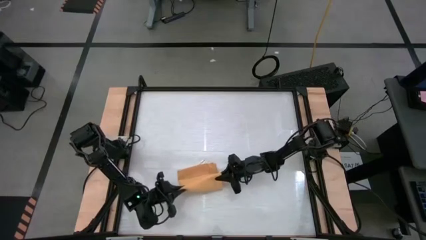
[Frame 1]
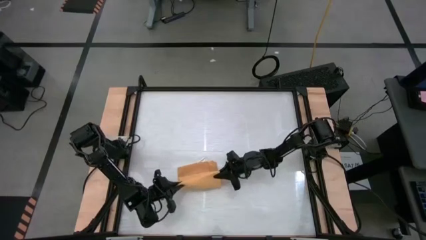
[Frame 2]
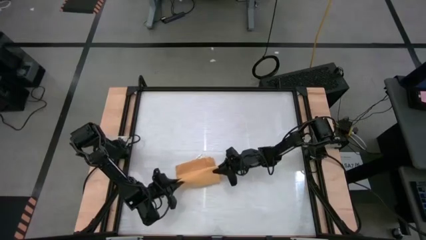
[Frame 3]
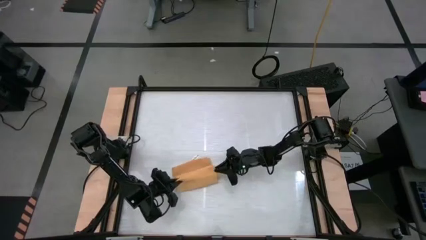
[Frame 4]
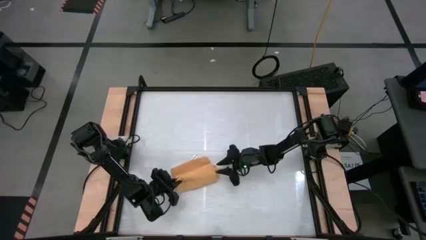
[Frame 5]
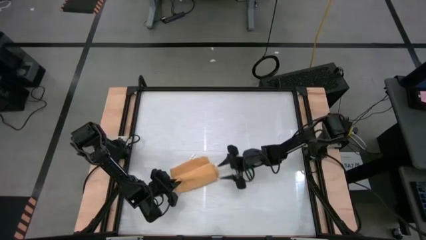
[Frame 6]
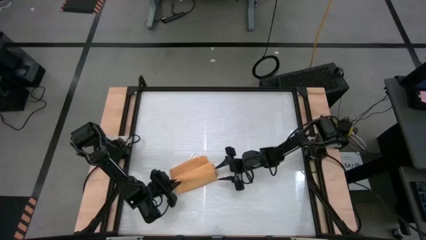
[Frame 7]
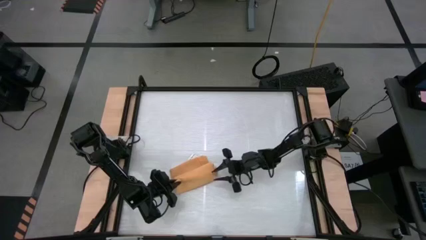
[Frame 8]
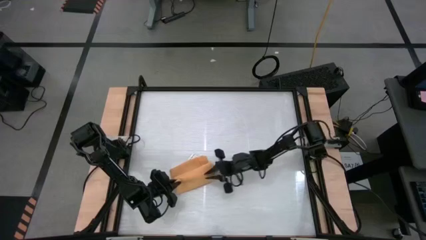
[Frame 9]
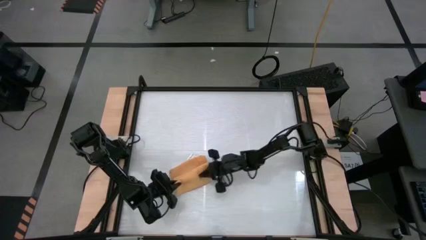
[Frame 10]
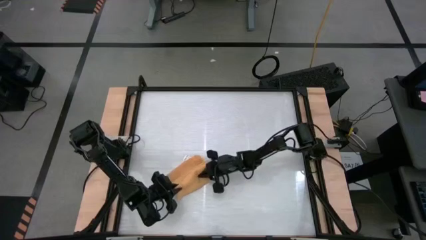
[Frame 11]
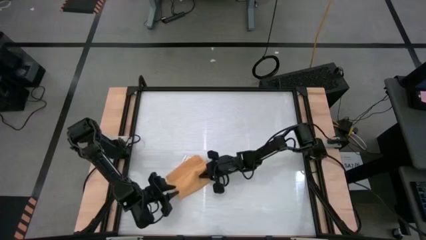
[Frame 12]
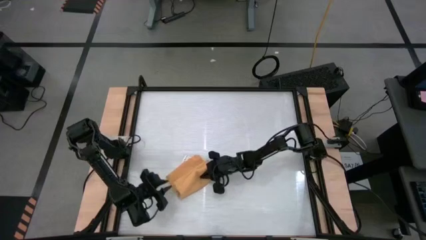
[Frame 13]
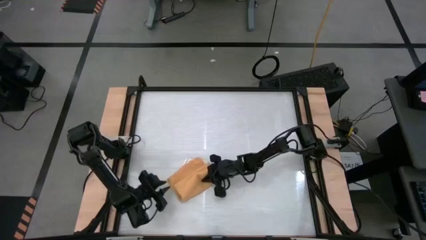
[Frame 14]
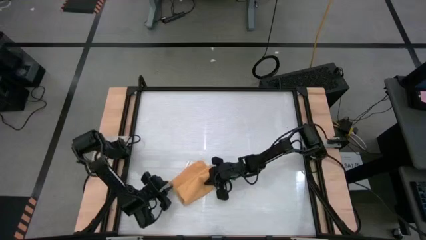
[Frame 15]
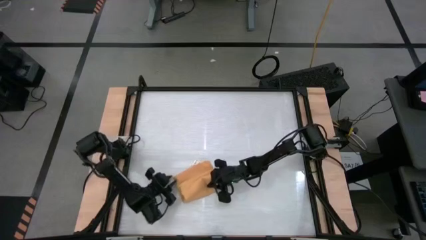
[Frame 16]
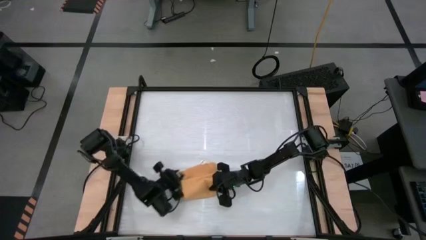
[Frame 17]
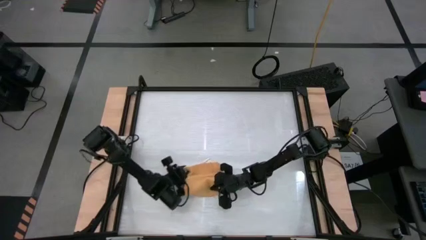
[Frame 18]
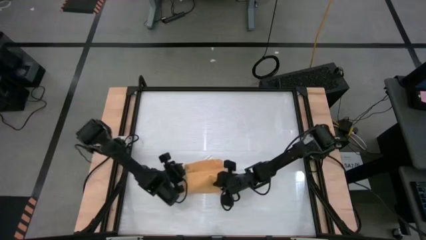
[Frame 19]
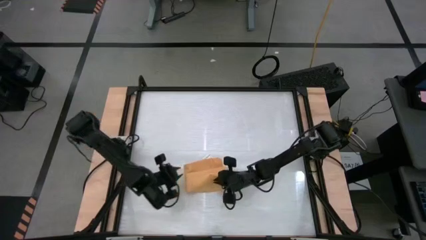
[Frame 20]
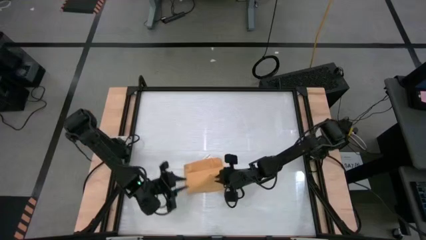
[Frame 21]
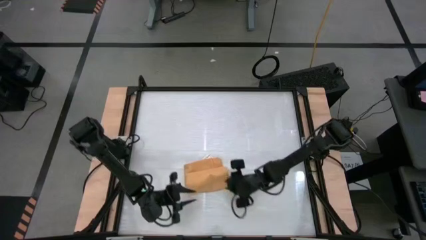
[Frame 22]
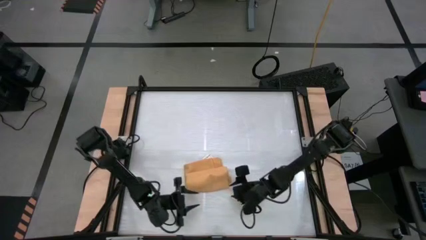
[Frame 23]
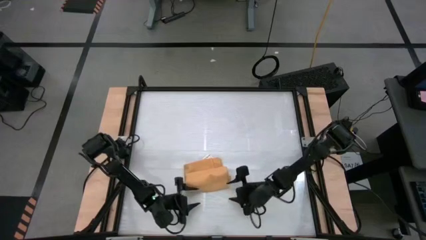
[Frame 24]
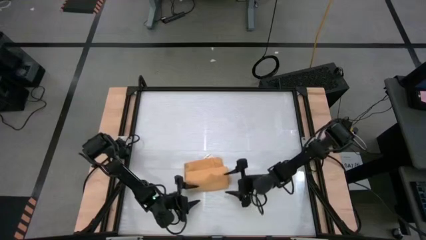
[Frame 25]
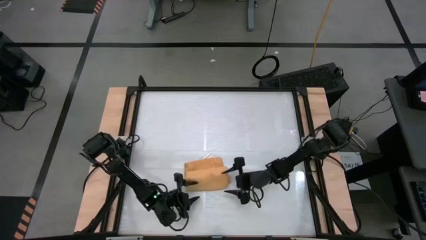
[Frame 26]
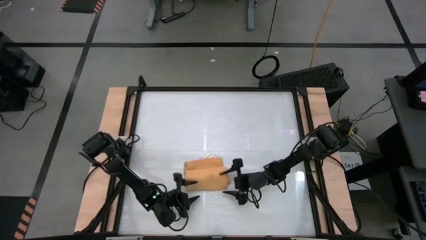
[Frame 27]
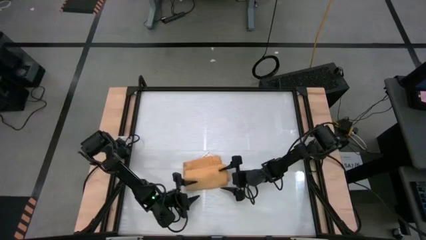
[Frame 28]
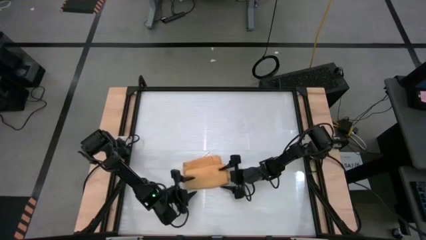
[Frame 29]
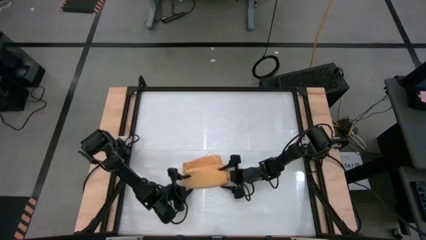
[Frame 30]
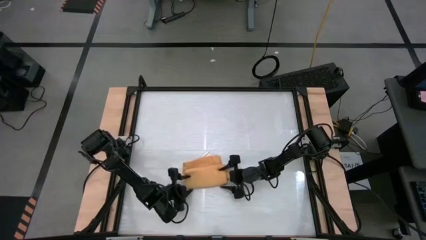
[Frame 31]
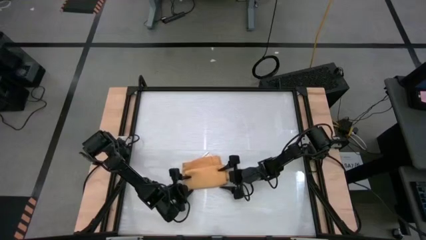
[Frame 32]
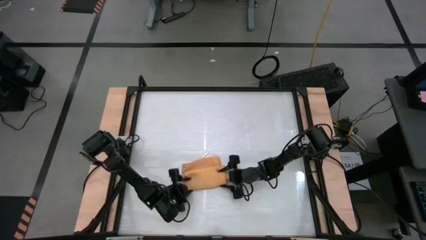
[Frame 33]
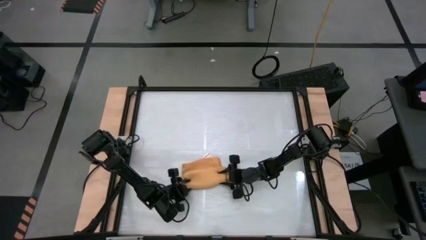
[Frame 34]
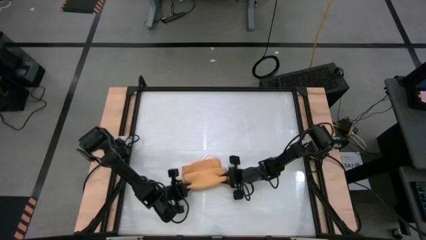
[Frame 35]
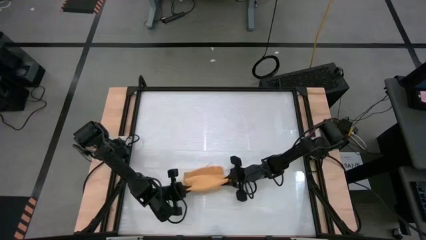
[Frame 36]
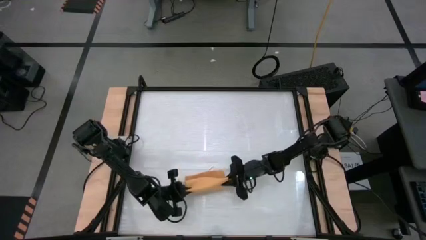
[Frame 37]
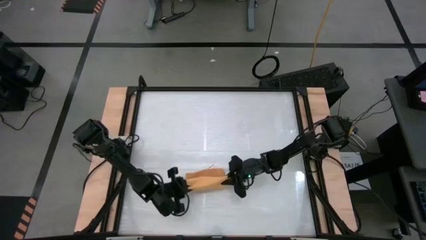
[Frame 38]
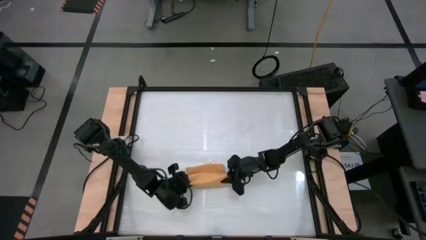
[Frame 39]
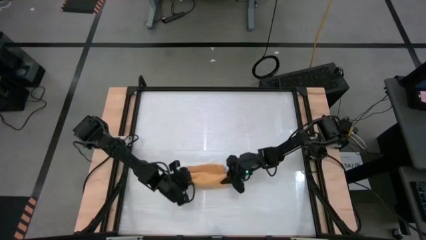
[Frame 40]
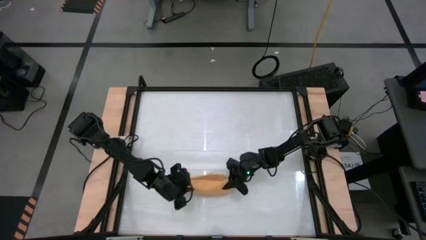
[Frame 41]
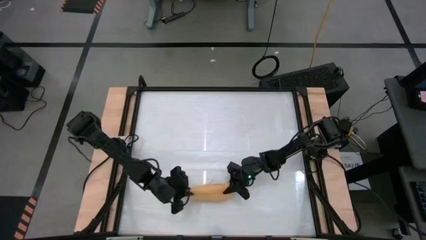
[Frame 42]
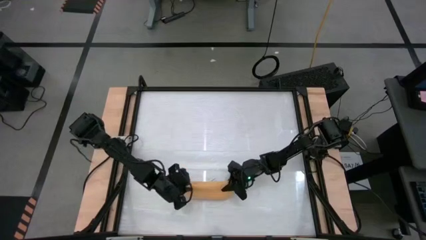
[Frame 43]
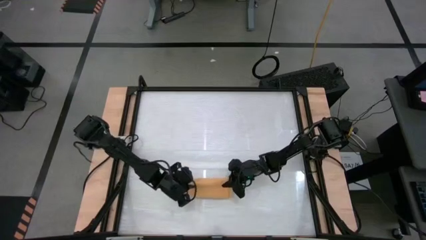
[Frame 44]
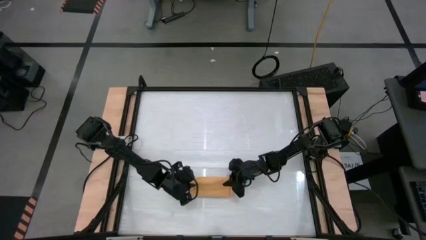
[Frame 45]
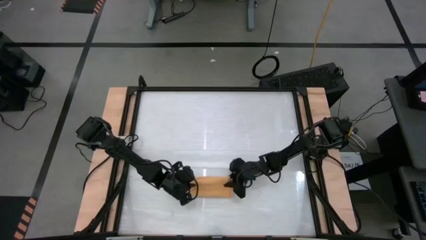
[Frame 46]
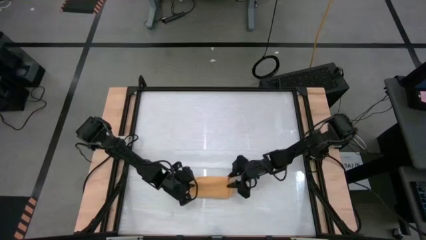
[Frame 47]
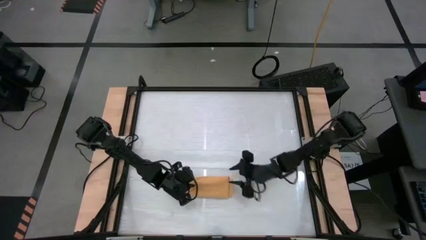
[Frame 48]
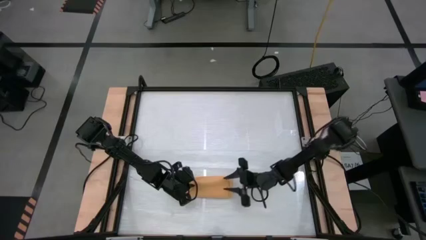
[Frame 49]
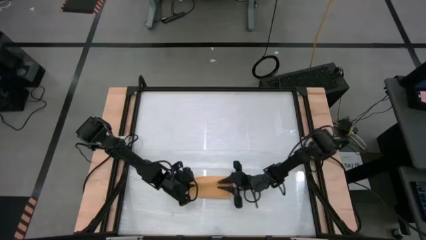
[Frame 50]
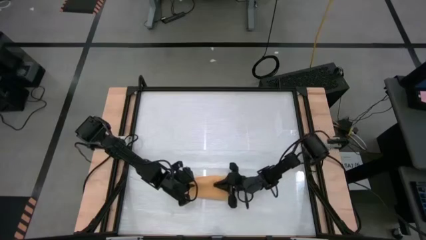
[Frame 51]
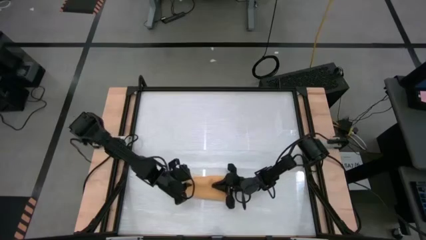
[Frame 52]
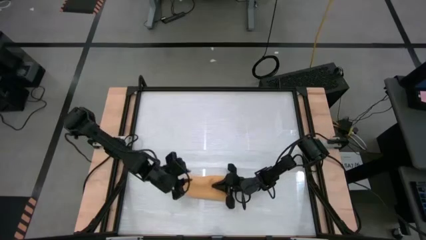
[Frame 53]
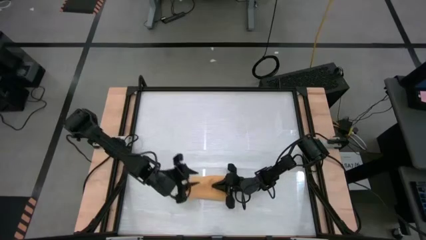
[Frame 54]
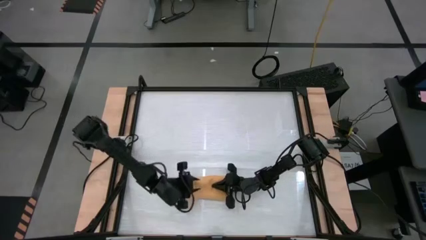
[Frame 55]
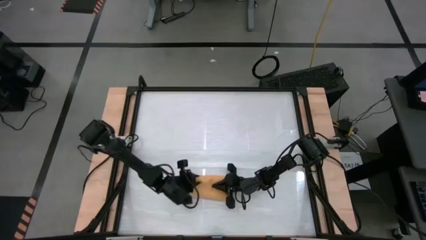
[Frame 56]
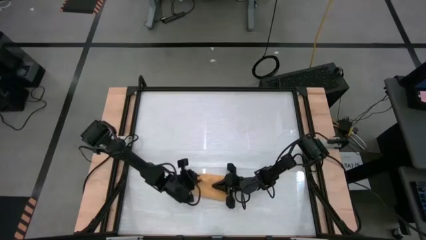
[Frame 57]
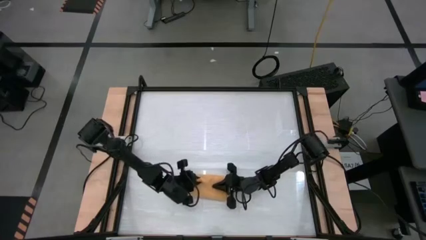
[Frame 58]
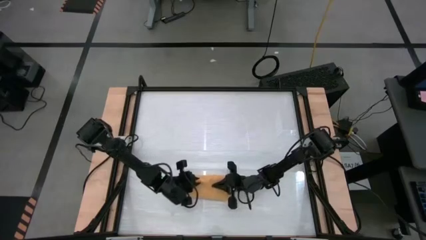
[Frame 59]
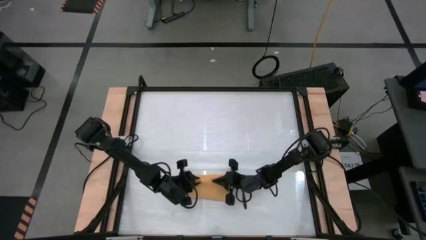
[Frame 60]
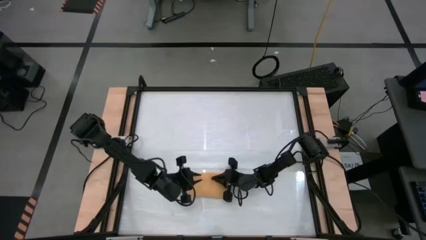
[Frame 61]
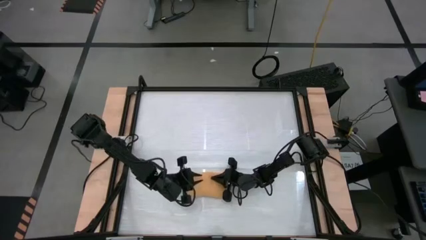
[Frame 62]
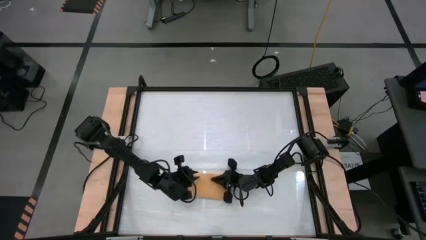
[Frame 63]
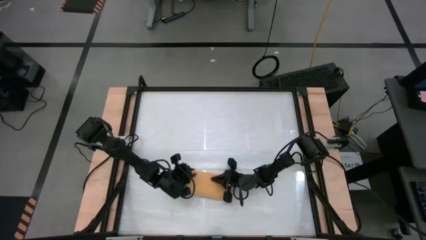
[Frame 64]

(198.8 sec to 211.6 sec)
Task: Roll towel
Roll the yellow towel
